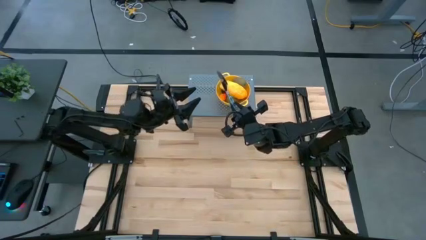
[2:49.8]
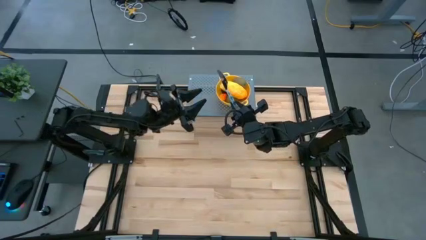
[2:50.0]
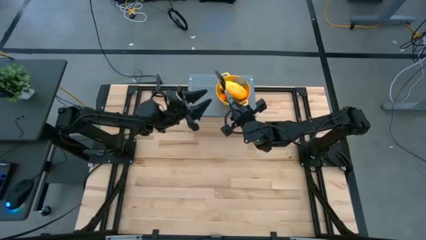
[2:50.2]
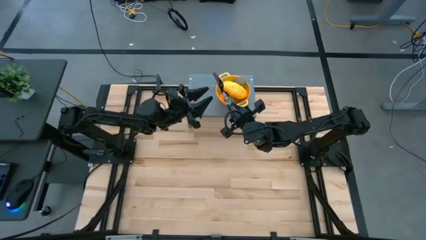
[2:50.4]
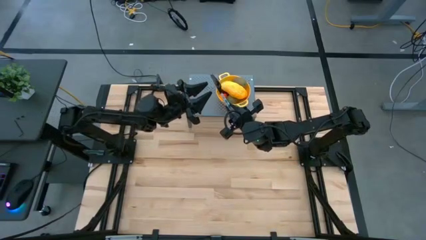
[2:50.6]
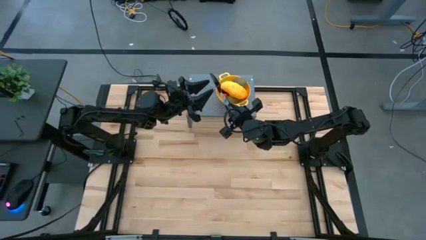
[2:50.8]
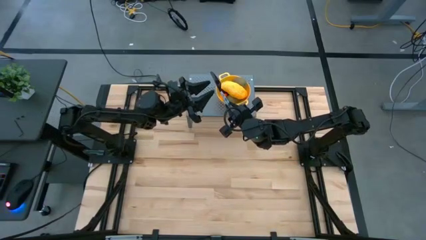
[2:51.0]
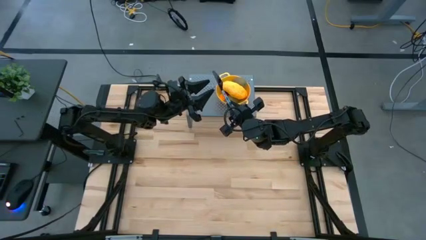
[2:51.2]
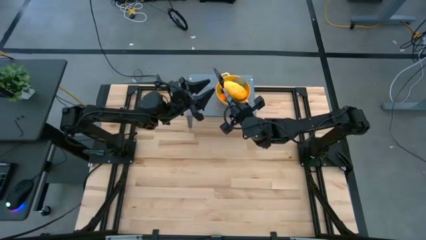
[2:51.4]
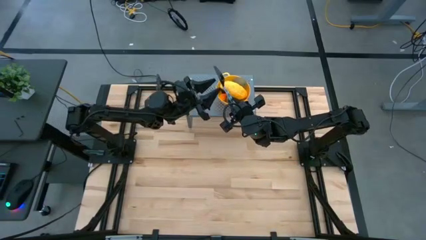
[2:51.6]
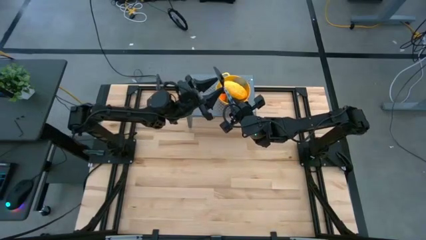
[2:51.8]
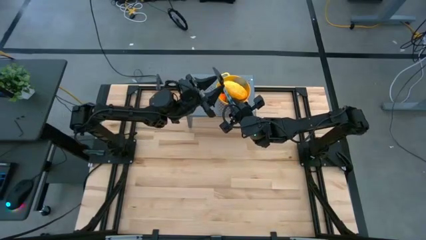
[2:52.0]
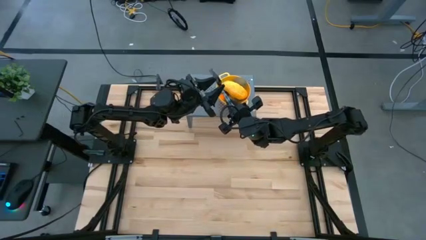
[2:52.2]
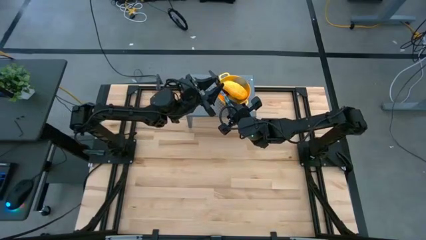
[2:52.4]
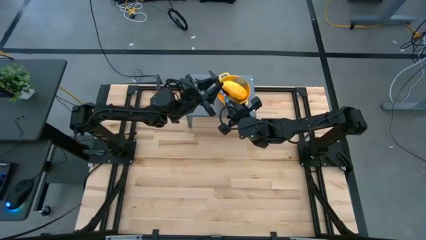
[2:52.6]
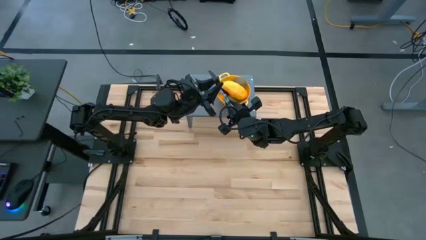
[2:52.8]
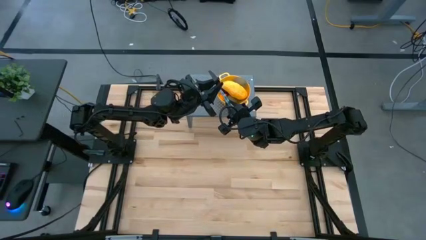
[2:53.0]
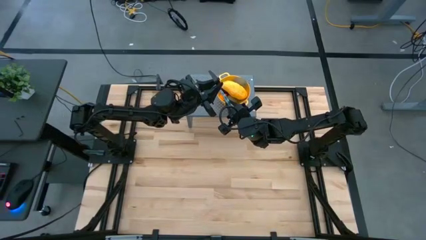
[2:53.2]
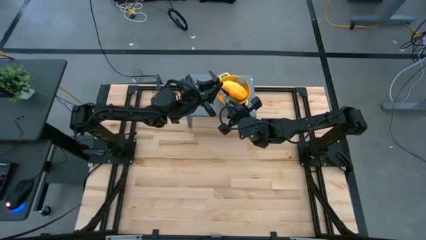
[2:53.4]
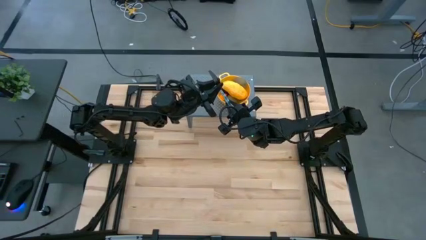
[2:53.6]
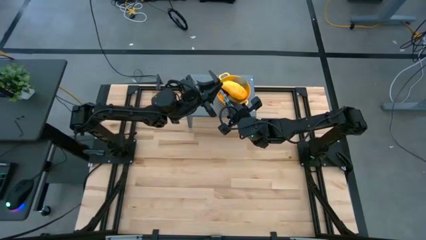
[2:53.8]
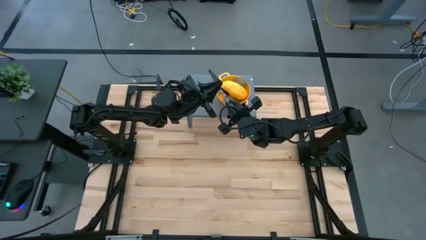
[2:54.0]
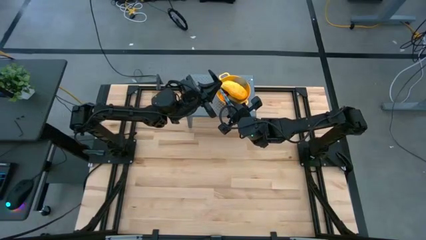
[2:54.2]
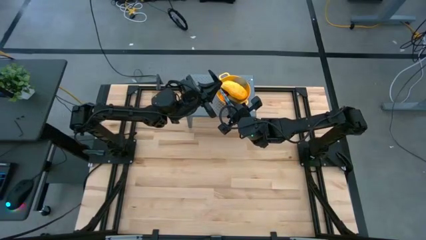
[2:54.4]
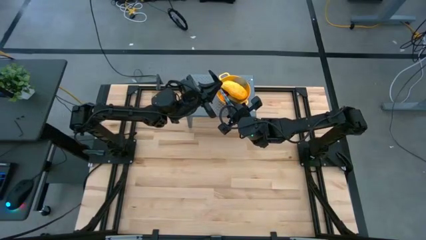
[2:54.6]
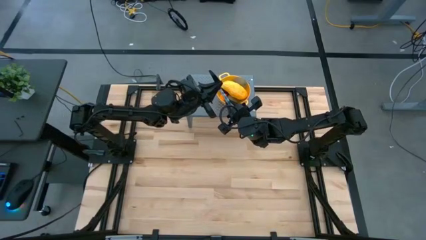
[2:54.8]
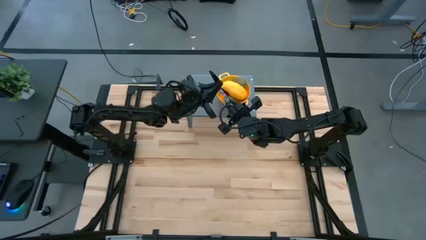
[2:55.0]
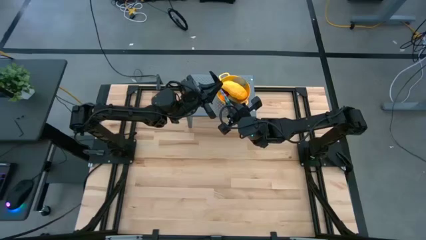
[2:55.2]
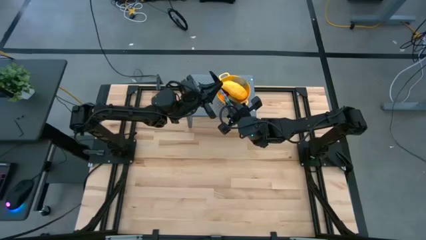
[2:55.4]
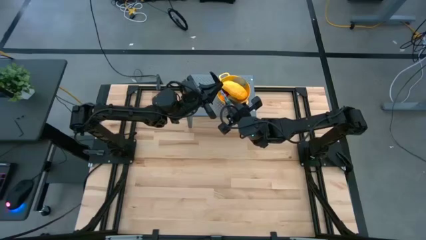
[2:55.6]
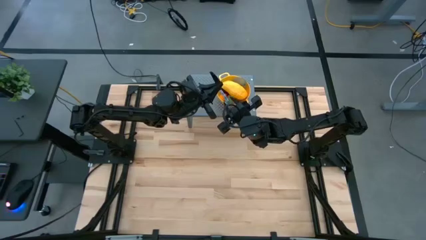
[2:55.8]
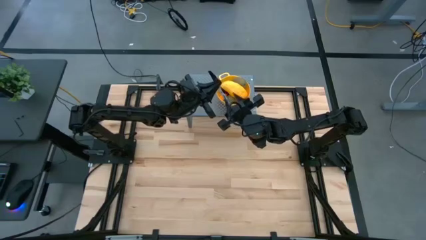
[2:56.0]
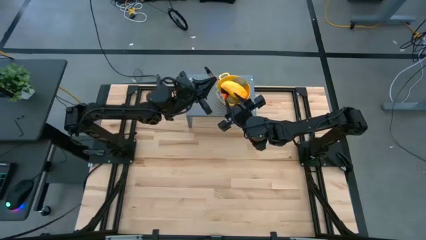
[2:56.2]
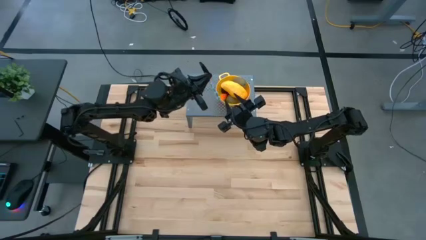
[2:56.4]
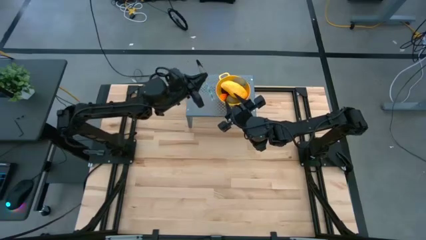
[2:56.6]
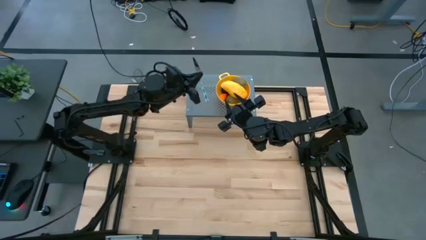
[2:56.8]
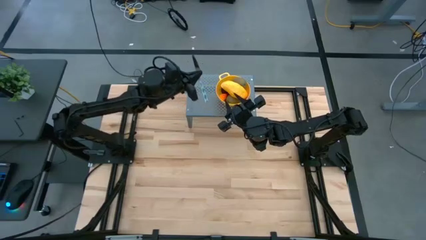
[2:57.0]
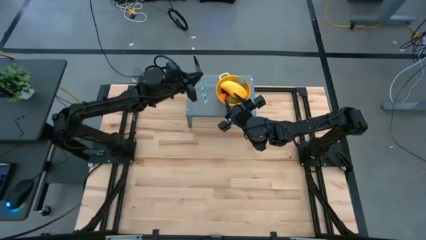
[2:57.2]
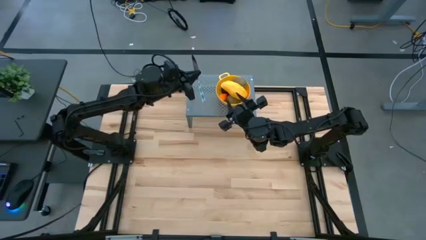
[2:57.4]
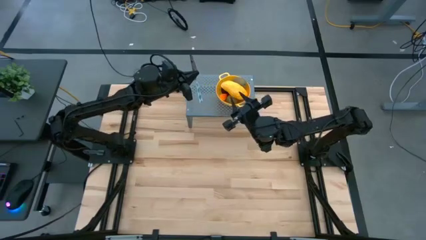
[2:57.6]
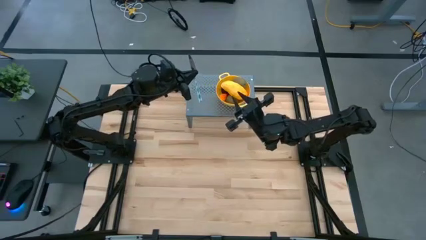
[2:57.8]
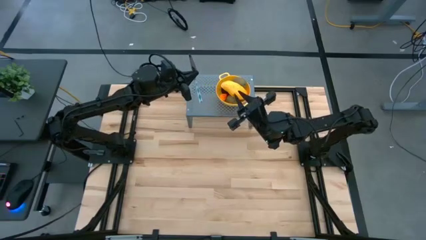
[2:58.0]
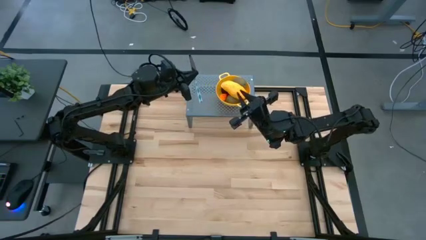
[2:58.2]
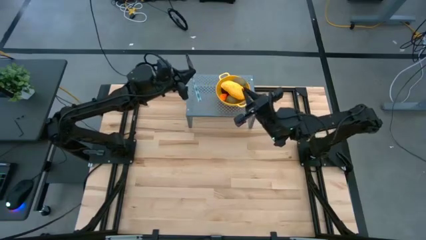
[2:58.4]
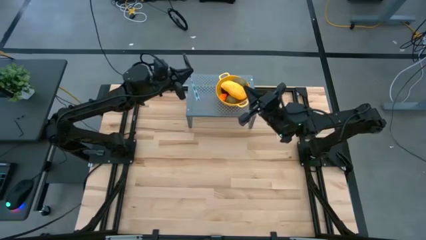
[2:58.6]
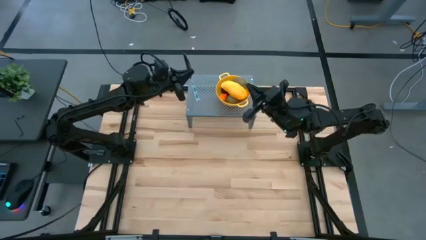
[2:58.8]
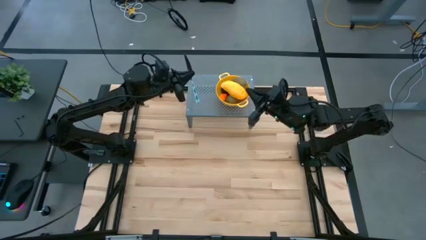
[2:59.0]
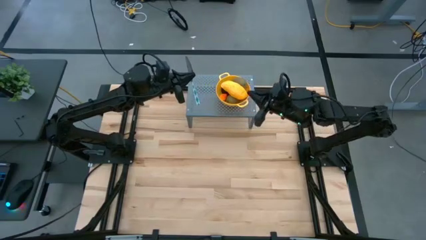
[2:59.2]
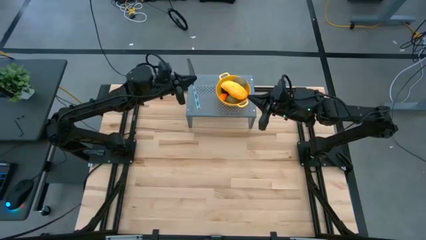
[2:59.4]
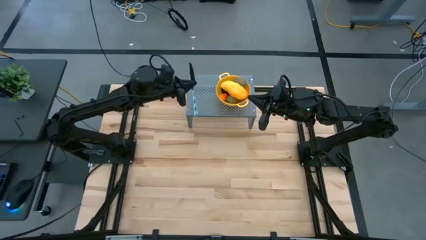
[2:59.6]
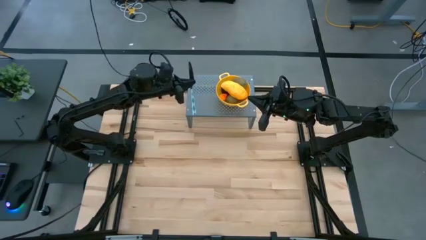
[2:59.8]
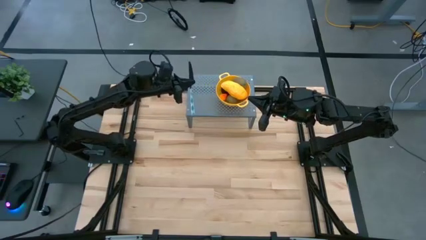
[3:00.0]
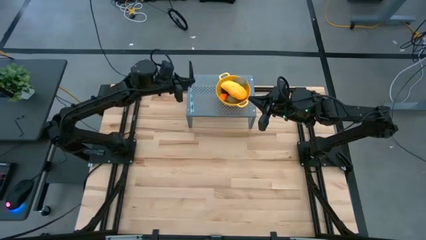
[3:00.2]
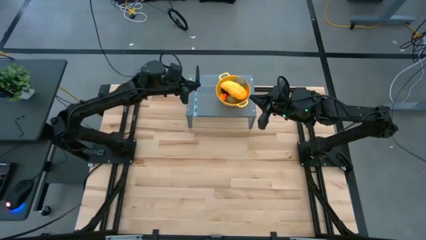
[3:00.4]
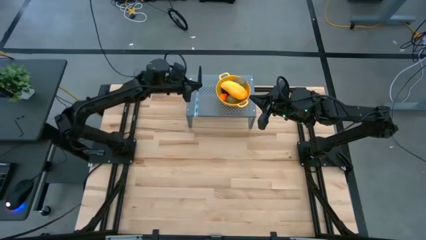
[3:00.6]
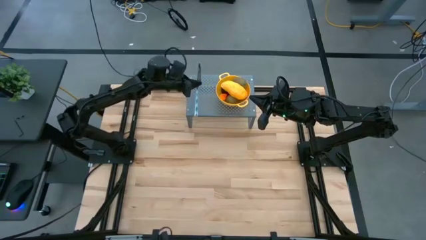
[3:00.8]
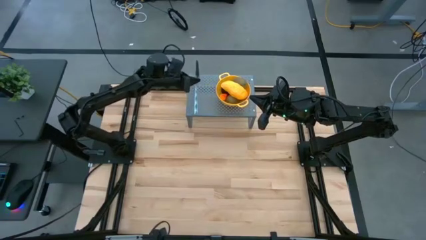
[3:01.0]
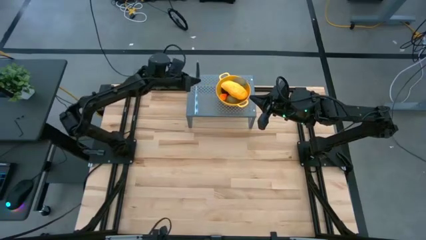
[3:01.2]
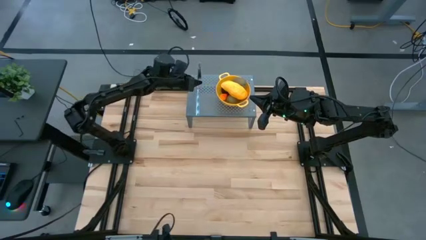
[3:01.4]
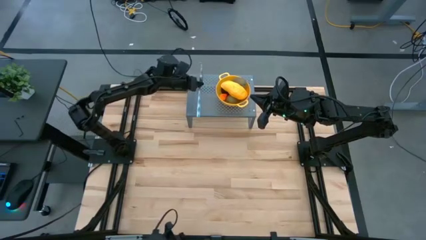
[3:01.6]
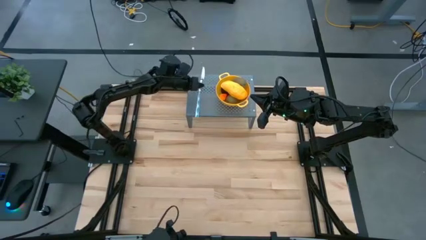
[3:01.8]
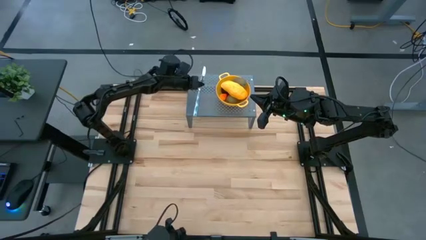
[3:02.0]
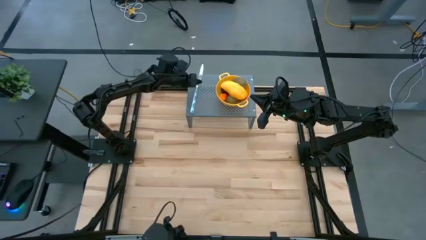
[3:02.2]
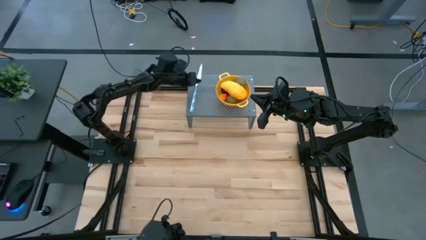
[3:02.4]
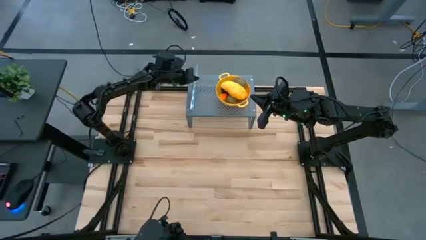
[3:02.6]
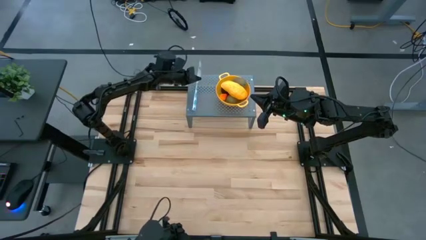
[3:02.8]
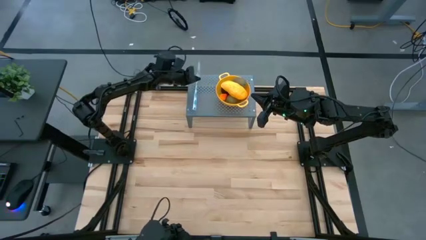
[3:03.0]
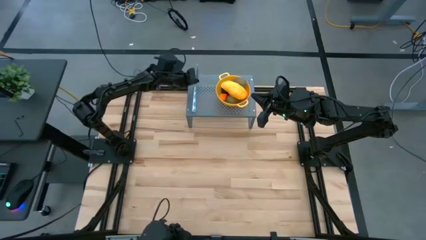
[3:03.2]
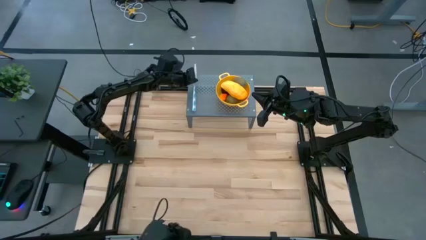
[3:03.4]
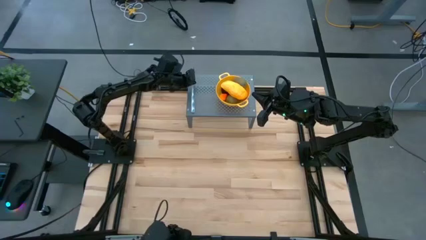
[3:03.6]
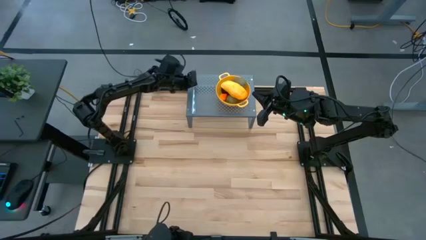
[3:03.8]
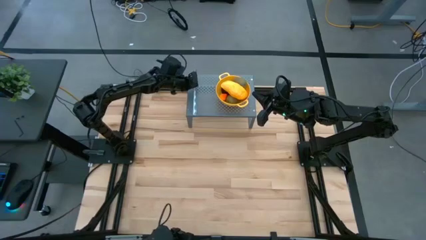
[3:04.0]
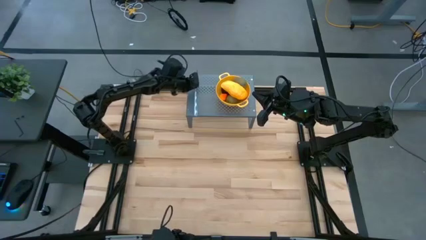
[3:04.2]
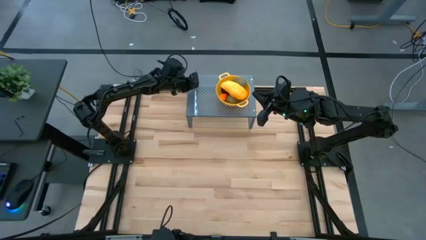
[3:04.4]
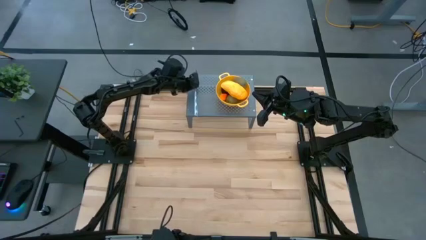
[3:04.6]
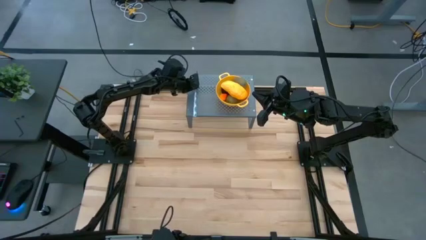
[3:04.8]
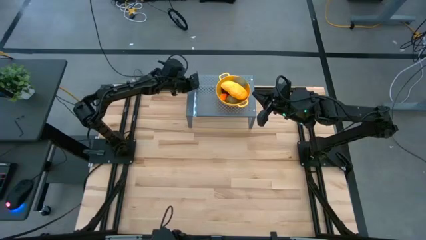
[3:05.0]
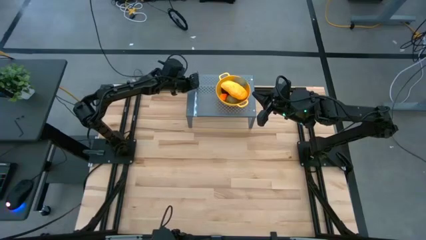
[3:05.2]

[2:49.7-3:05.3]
Task: Pick & Place Fruit
Put the blue patterned table knife on the shelf
